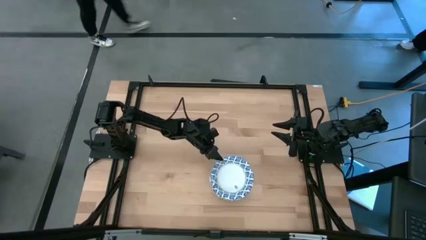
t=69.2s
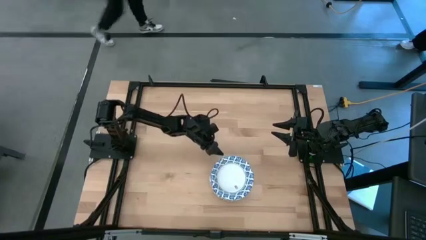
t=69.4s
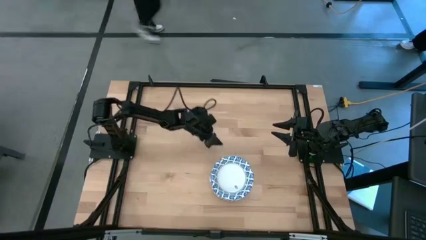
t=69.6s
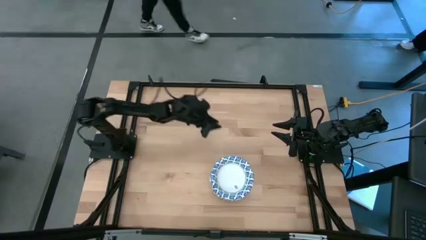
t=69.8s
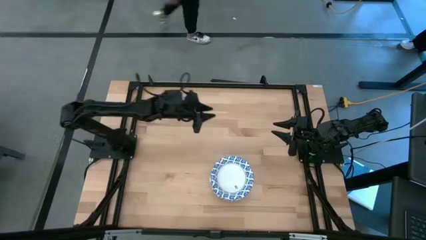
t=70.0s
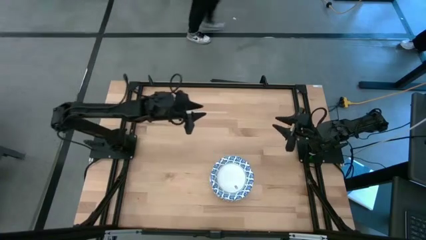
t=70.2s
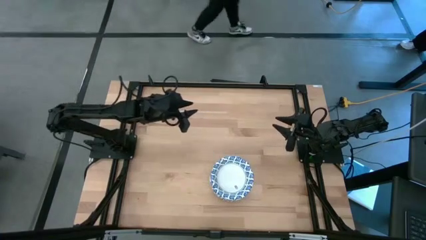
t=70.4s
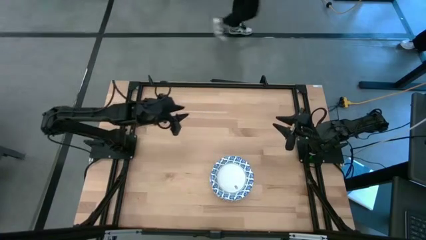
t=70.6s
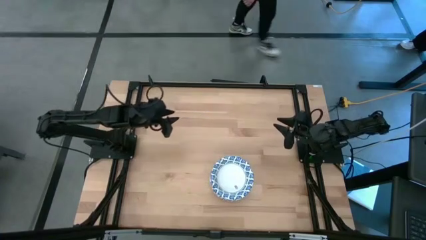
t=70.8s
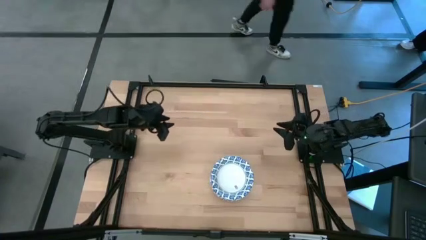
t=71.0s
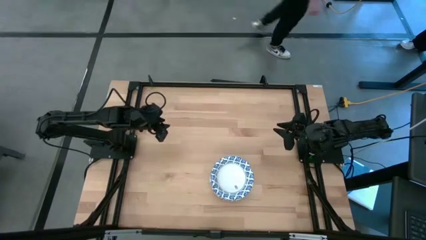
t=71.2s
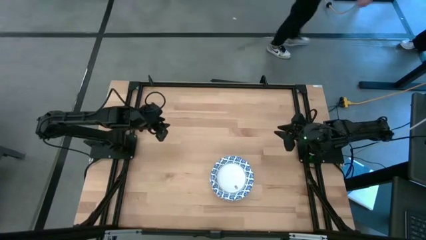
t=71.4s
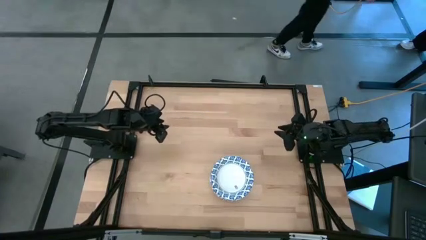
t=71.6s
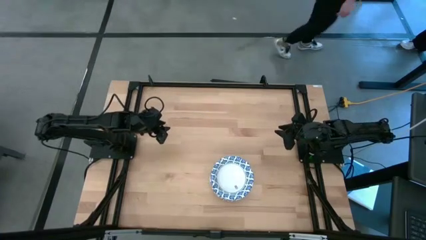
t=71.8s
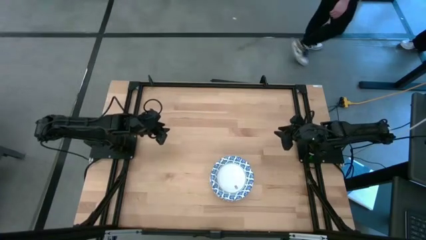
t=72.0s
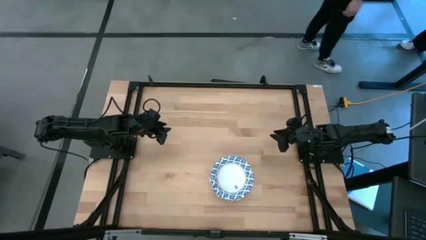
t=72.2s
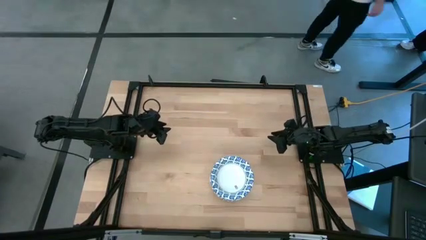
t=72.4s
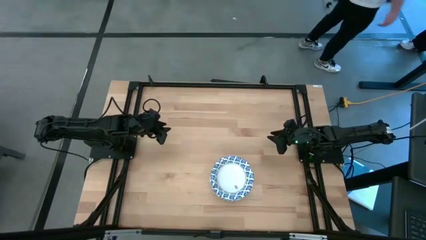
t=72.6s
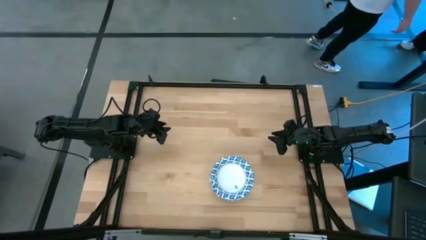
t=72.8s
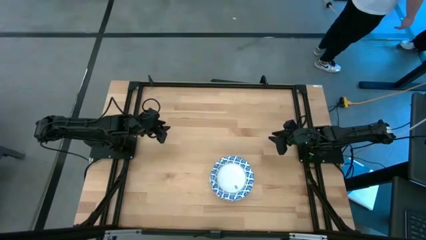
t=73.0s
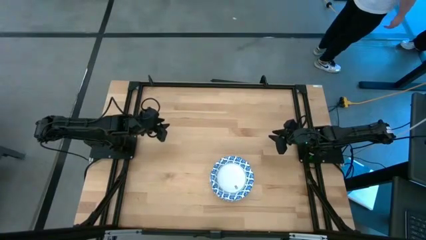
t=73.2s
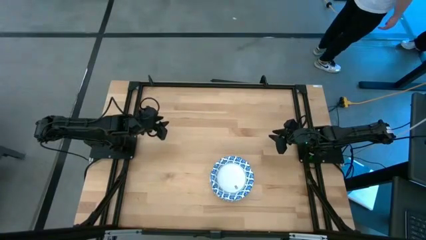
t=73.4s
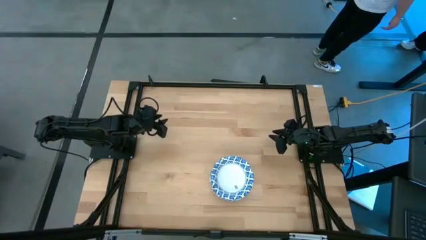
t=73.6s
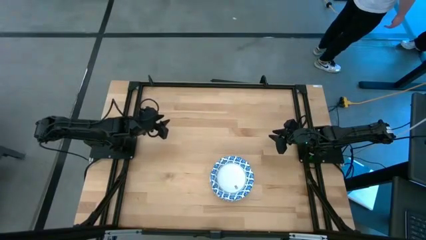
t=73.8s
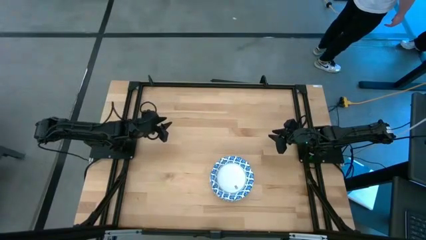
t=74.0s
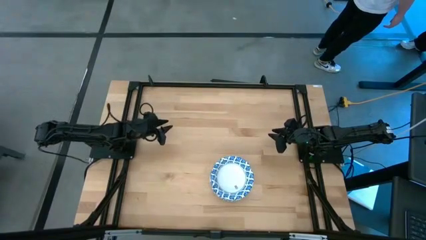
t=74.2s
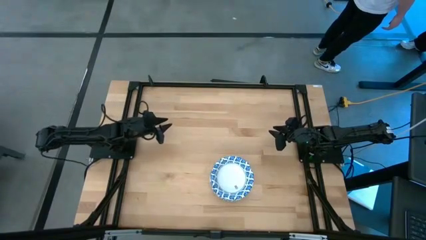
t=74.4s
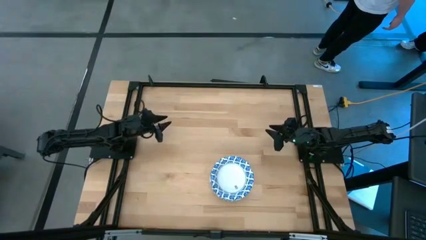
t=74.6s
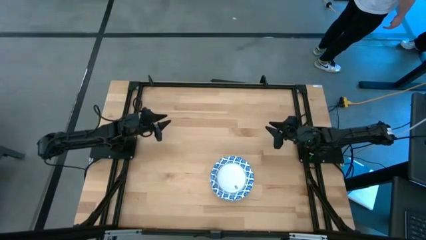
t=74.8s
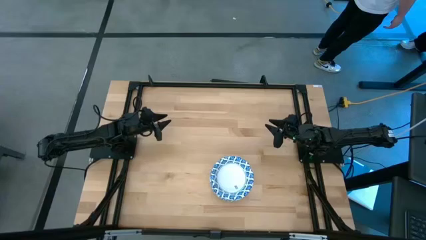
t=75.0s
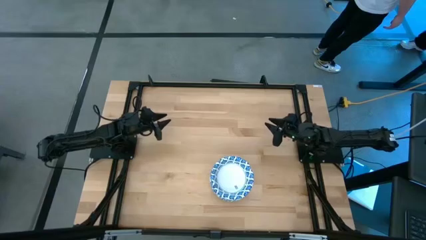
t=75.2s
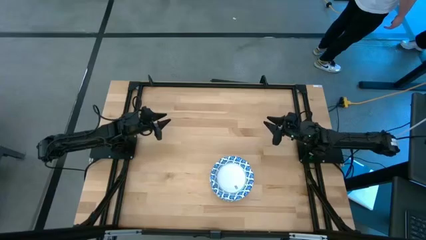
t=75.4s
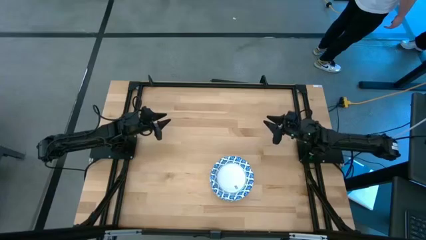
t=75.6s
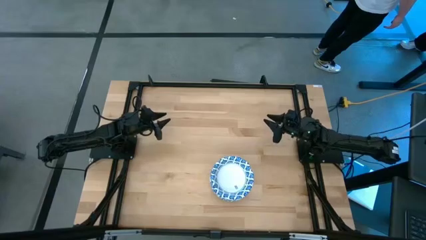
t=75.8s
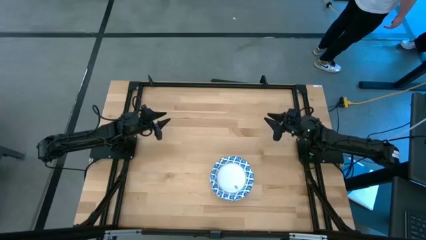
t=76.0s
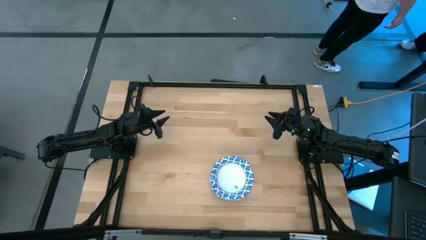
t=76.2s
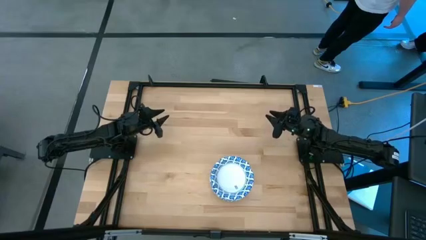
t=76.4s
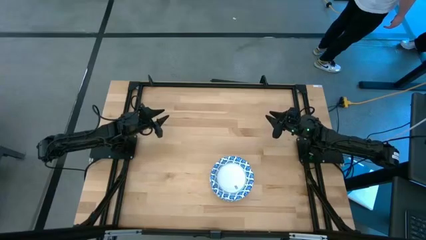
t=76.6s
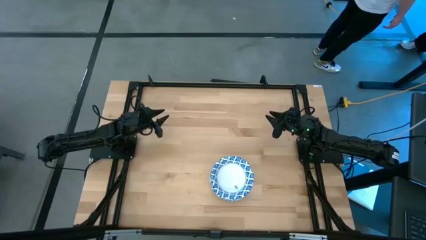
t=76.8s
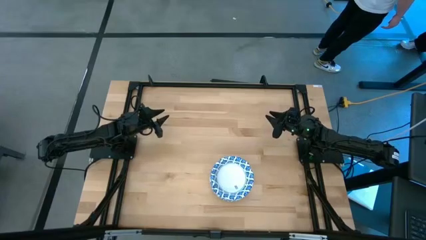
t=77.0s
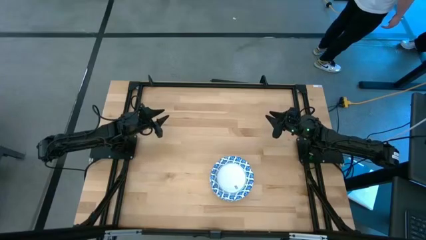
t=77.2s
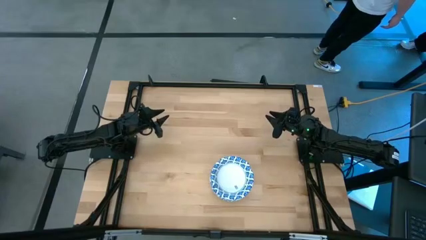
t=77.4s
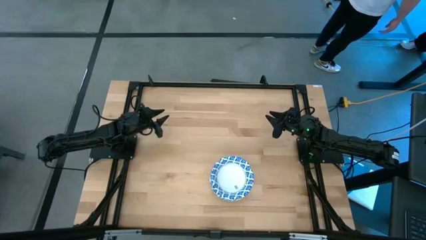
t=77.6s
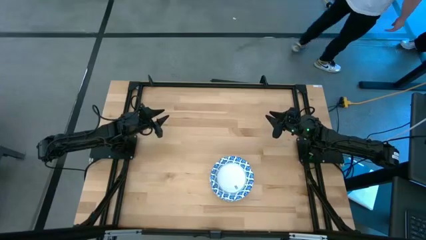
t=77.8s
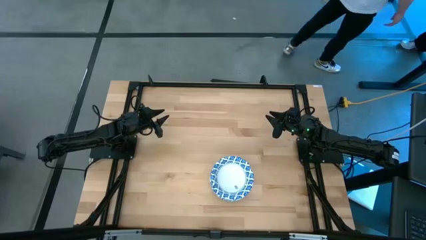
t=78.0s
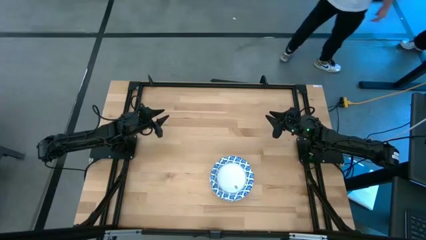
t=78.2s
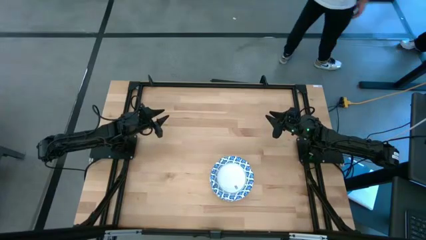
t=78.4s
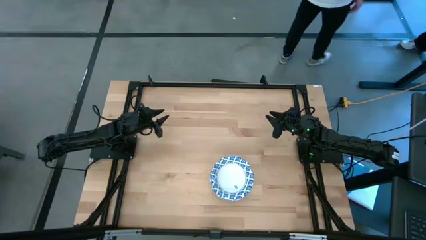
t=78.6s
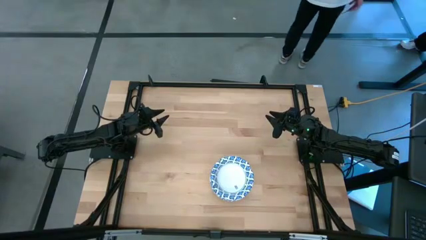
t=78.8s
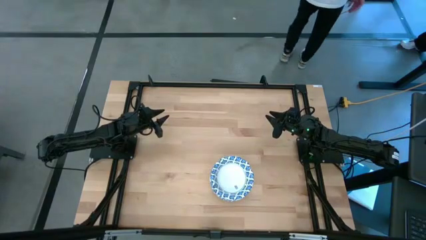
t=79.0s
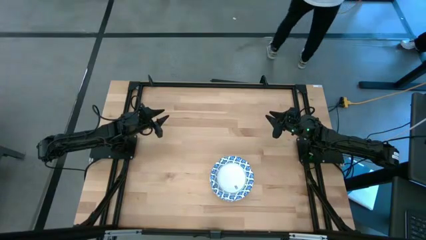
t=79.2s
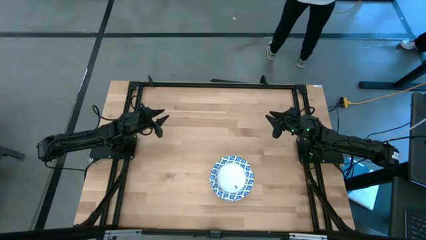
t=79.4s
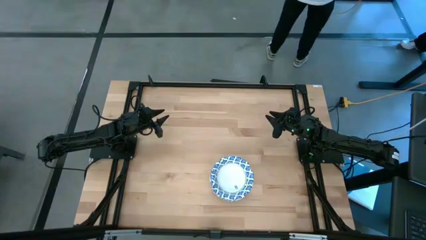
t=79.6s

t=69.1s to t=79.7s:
Task: Nest bowls inside each other
Return to Home Position
